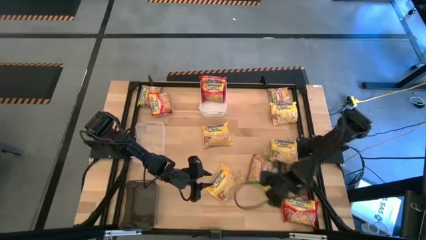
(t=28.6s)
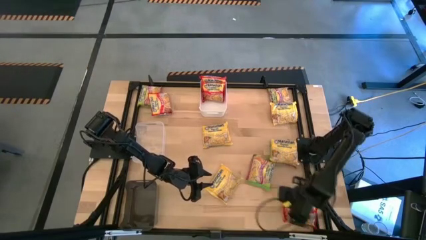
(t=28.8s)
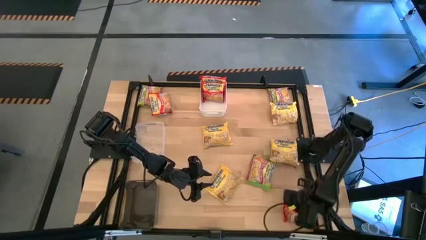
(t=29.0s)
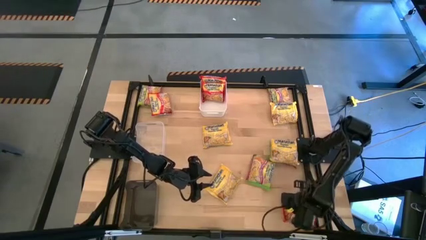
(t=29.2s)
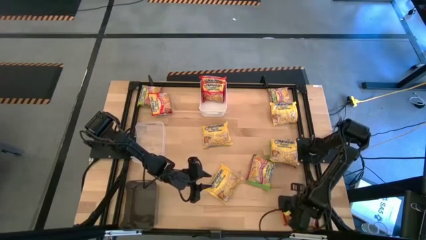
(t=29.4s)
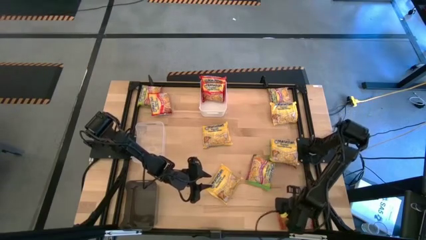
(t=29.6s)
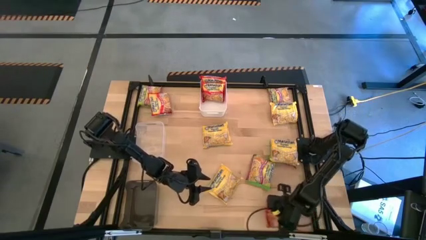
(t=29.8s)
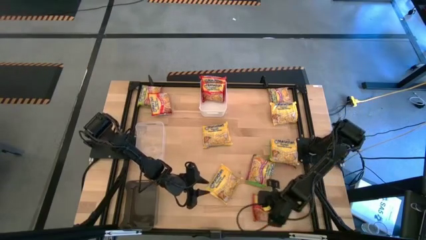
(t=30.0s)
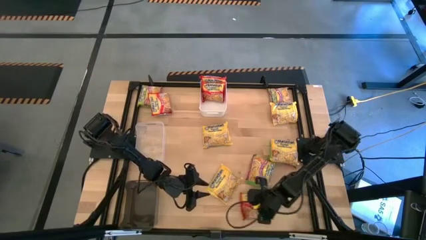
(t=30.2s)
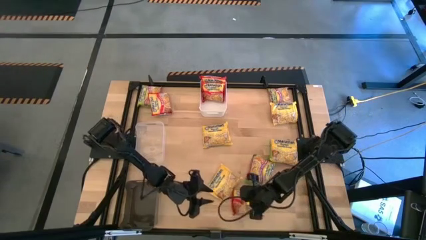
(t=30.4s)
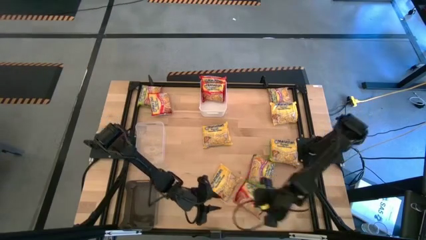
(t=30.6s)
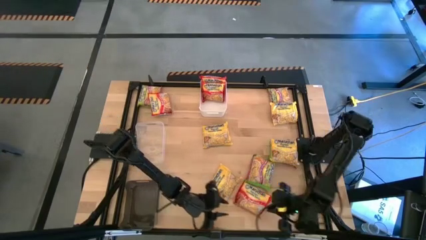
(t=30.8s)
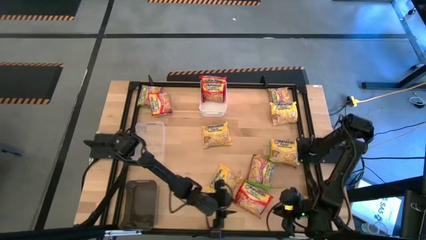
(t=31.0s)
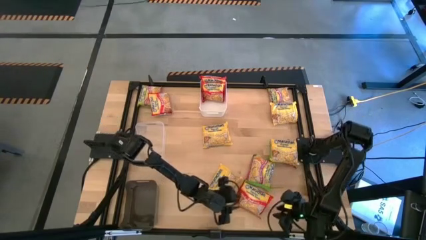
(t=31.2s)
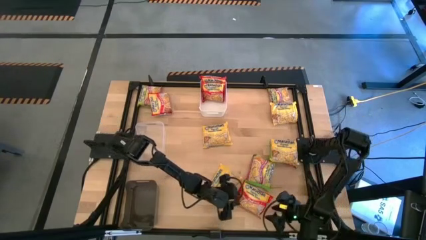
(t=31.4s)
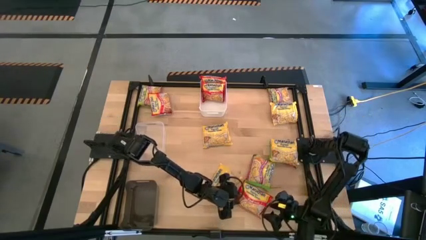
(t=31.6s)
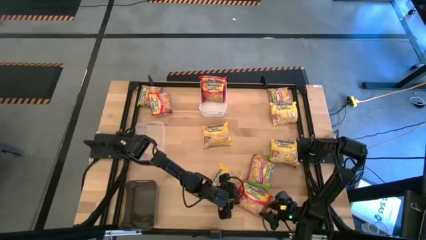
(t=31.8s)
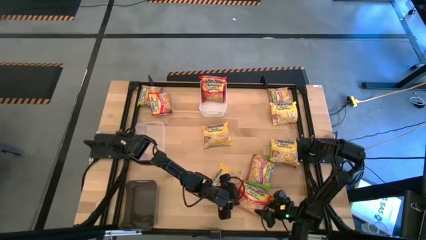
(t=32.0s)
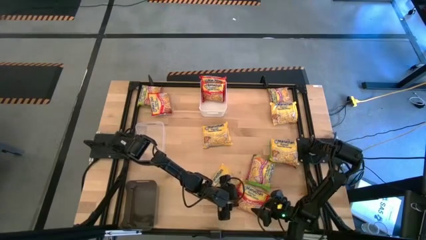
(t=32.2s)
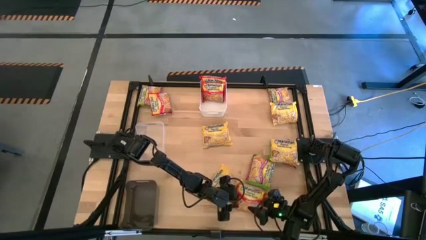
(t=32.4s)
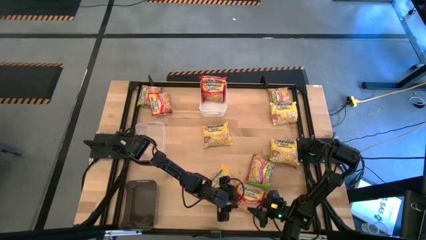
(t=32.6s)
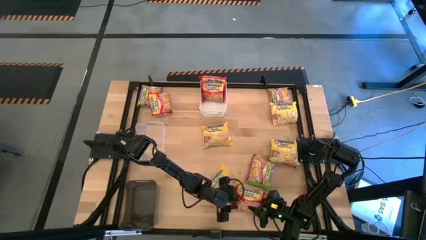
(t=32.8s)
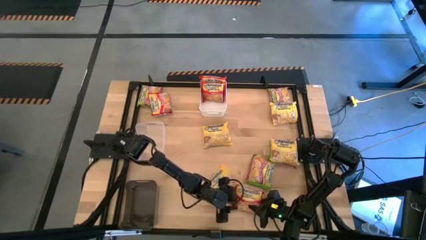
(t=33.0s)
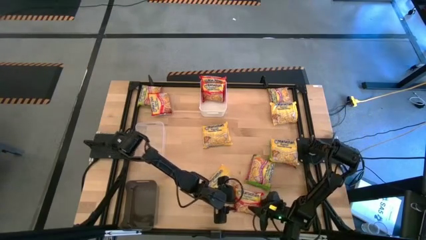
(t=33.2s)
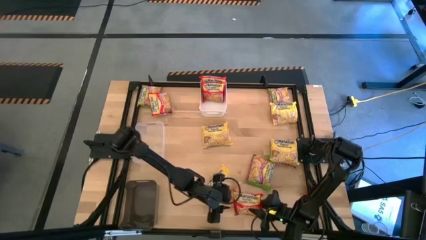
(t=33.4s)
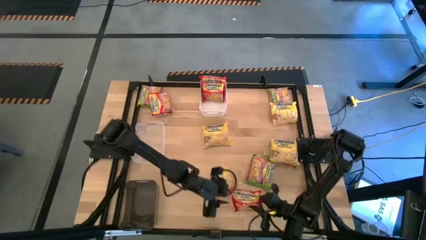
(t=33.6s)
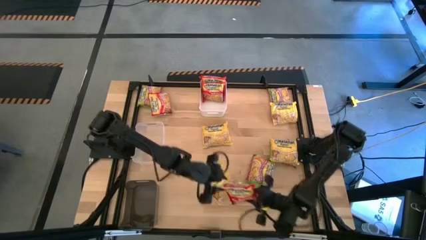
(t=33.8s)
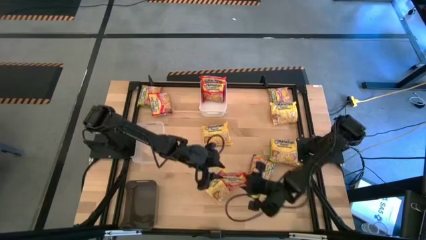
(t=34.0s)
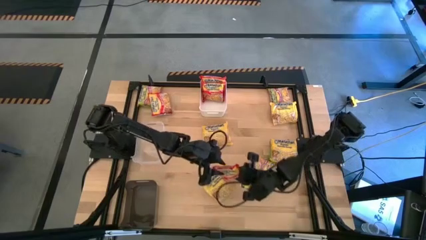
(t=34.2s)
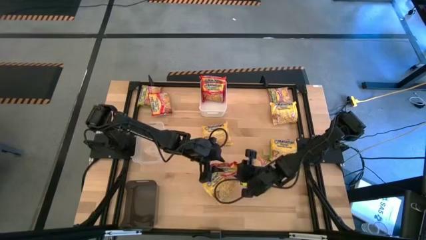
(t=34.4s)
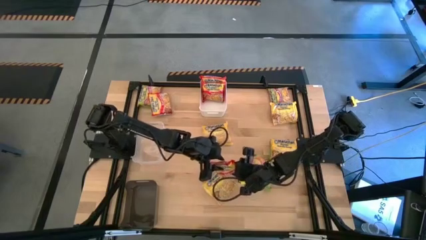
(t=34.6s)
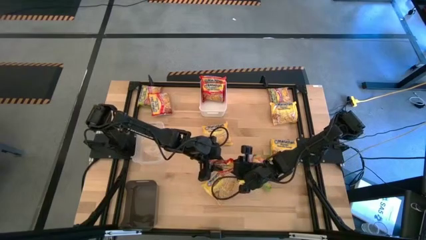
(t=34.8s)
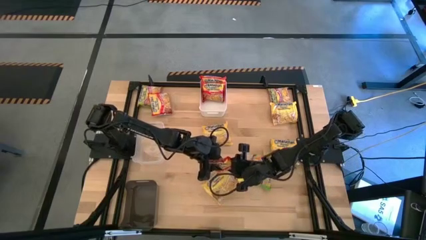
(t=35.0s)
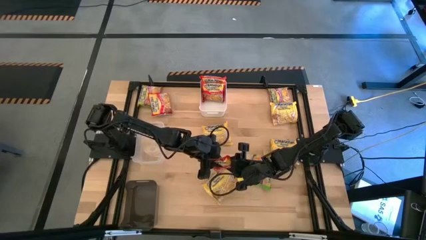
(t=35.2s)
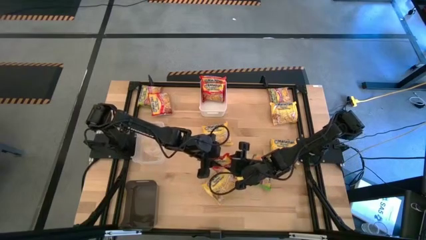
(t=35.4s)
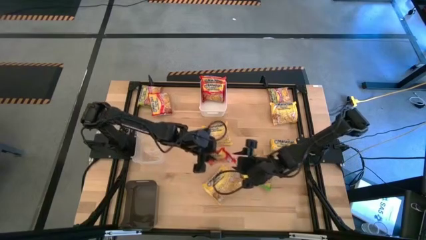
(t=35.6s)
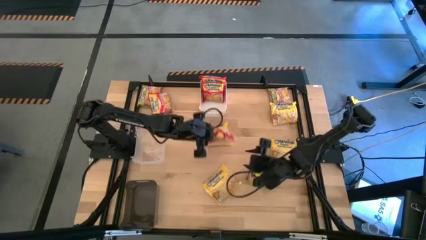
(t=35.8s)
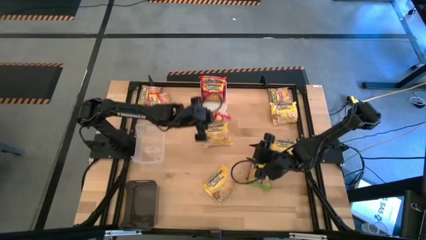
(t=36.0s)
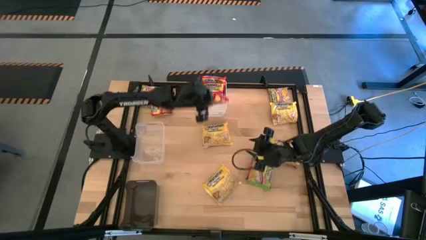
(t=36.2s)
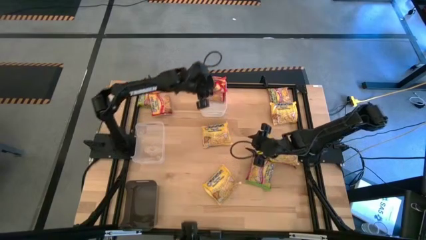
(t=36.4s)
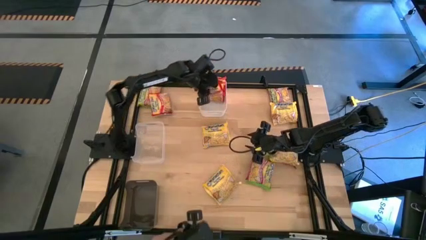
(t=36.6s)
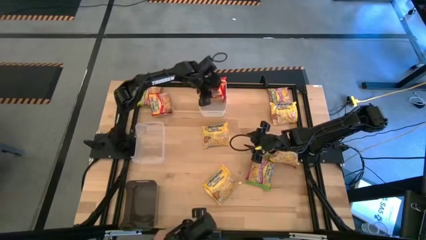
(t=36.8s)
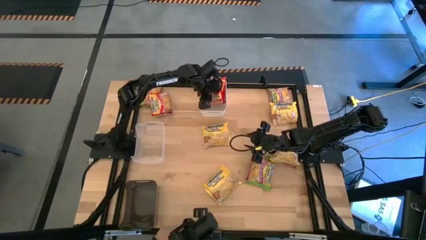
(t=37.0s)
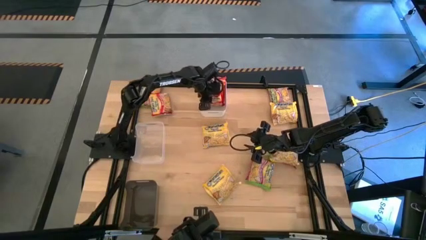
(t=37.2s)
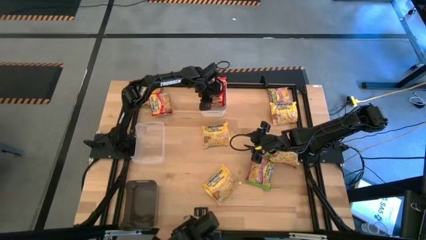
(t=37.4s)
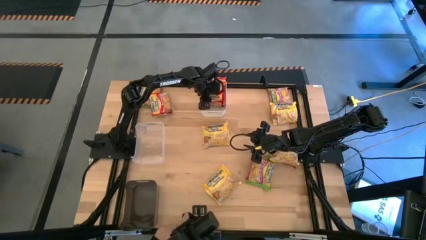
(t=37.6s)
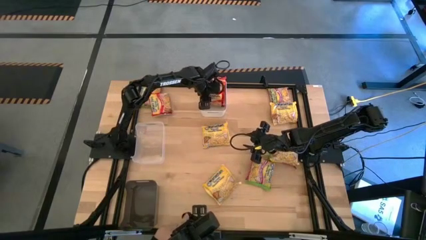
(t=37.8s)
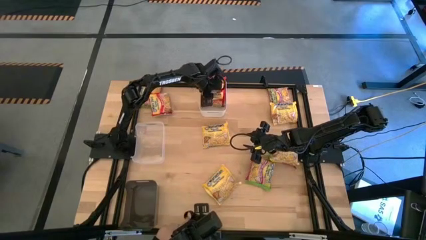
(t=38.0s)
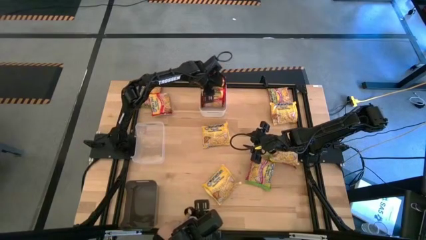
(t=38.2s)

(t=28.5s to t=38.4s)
Task: Sort Maruchan noodles
Put the red noodle pack into the white bin

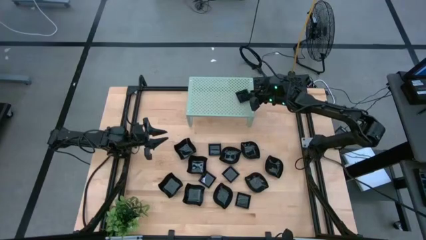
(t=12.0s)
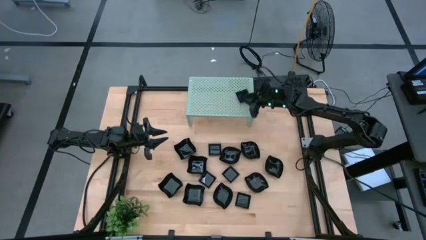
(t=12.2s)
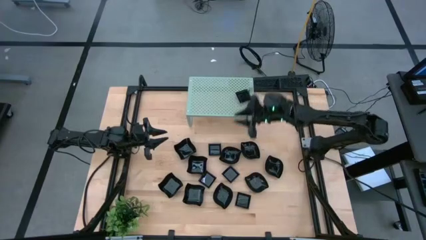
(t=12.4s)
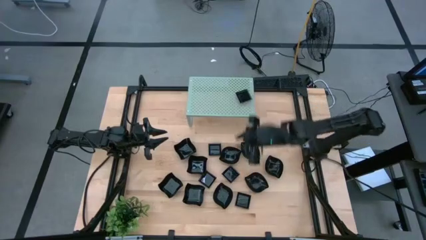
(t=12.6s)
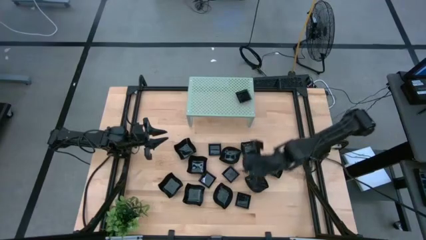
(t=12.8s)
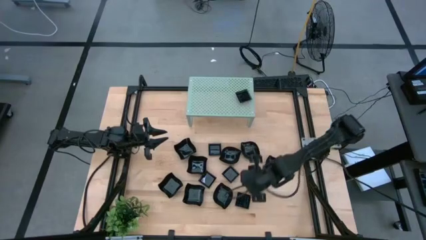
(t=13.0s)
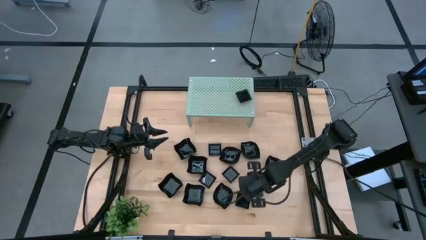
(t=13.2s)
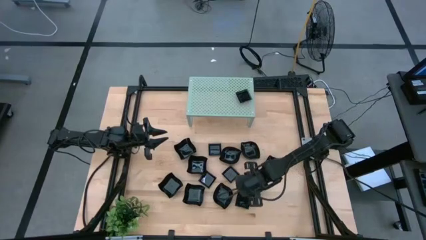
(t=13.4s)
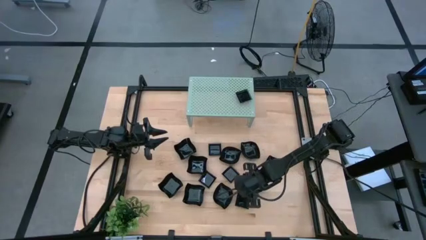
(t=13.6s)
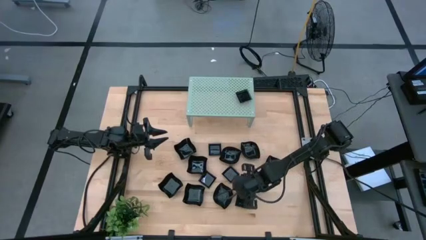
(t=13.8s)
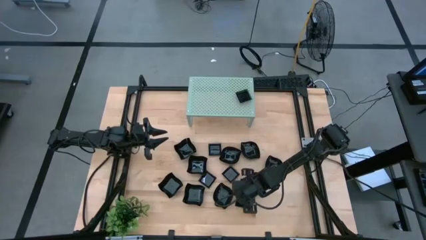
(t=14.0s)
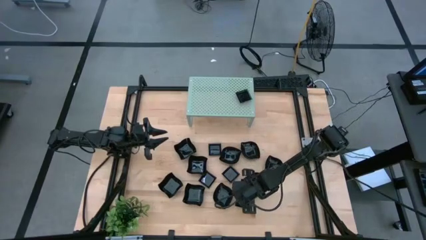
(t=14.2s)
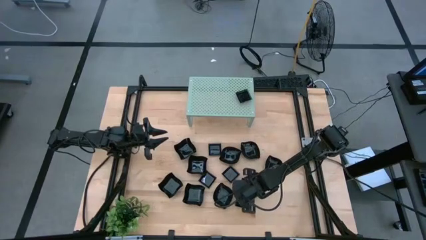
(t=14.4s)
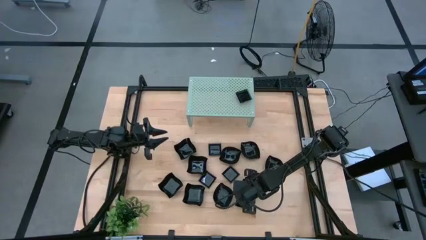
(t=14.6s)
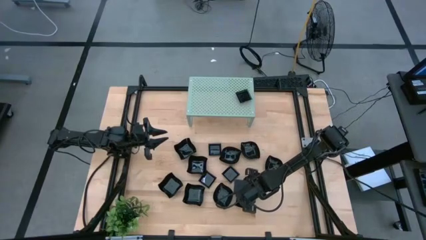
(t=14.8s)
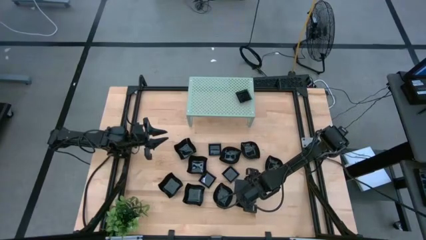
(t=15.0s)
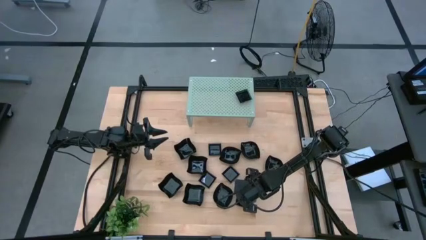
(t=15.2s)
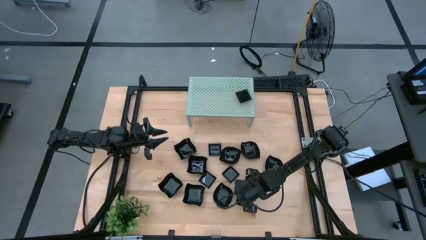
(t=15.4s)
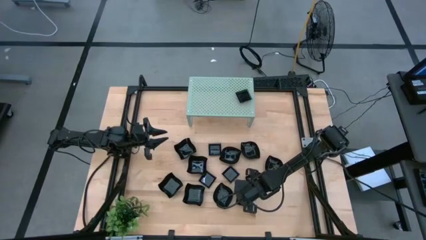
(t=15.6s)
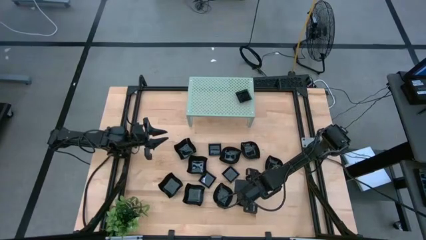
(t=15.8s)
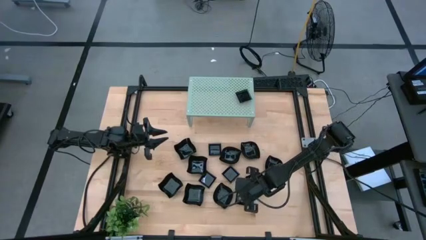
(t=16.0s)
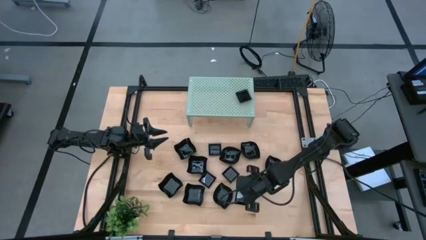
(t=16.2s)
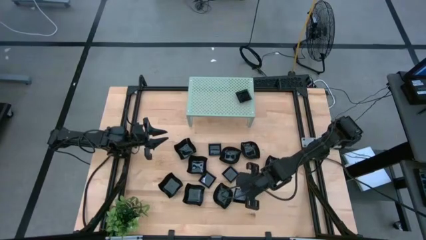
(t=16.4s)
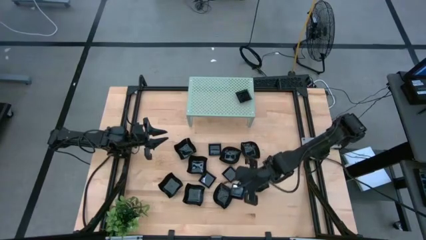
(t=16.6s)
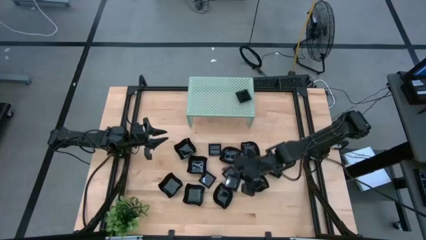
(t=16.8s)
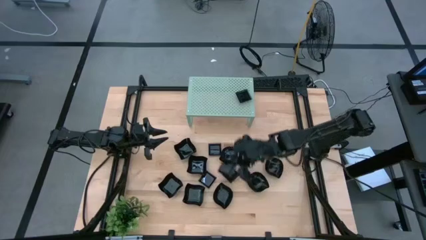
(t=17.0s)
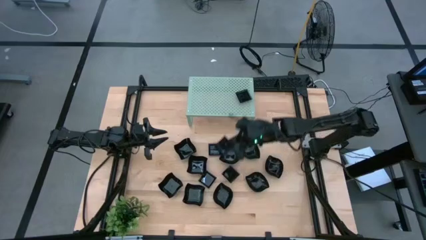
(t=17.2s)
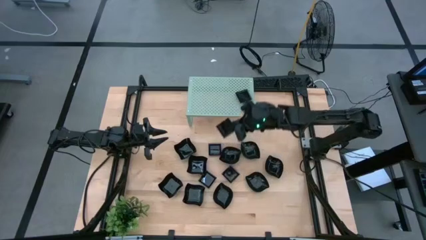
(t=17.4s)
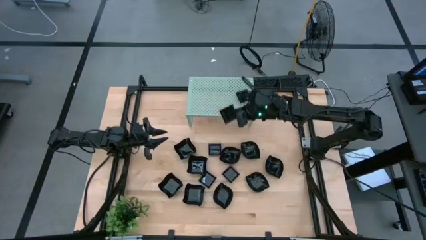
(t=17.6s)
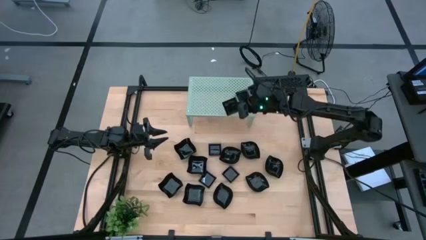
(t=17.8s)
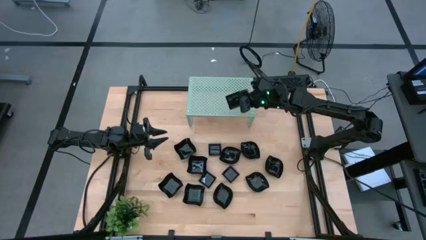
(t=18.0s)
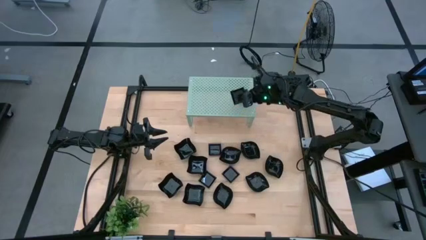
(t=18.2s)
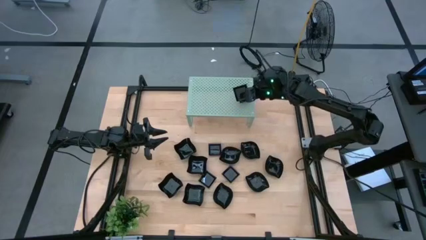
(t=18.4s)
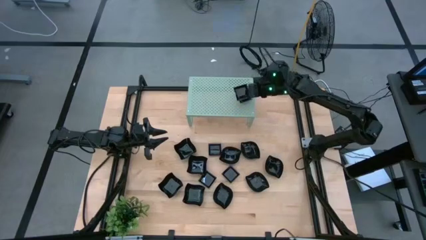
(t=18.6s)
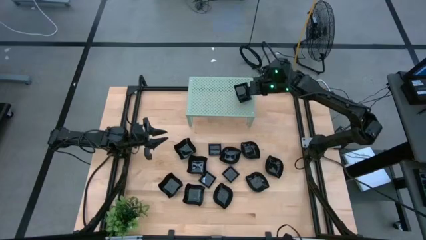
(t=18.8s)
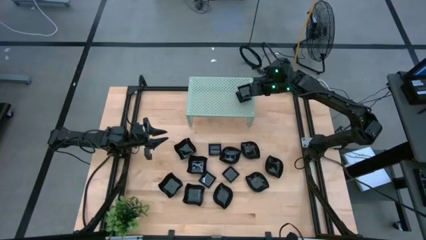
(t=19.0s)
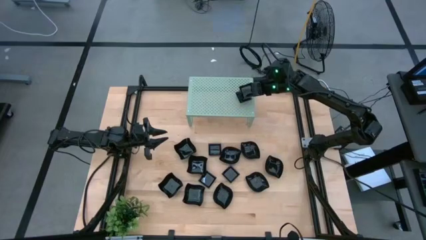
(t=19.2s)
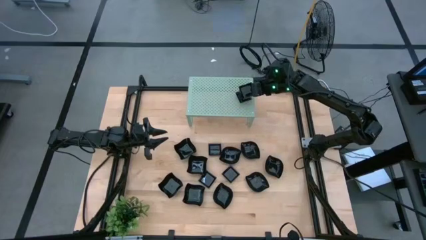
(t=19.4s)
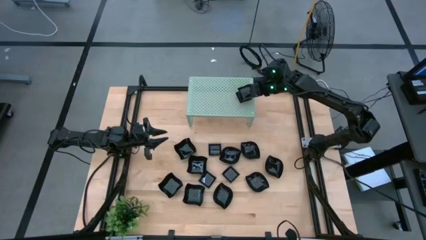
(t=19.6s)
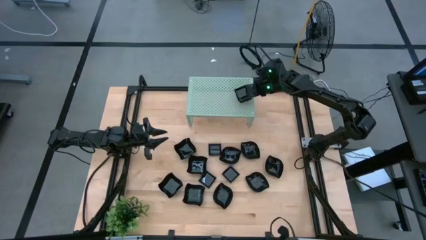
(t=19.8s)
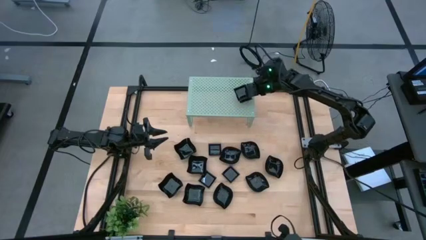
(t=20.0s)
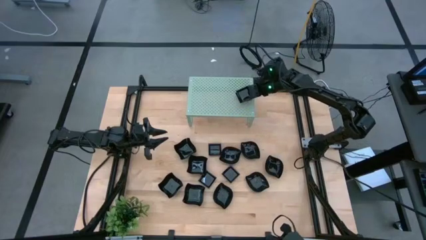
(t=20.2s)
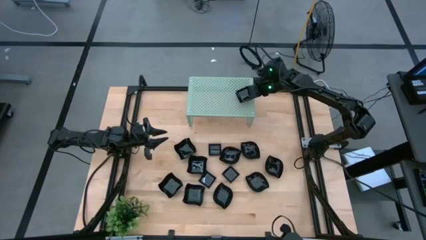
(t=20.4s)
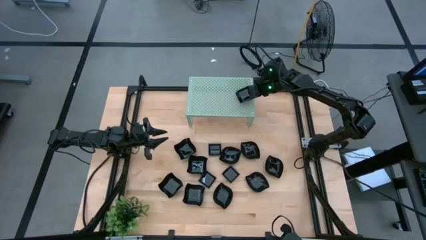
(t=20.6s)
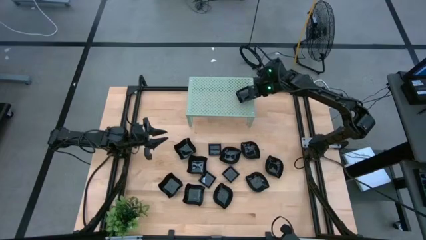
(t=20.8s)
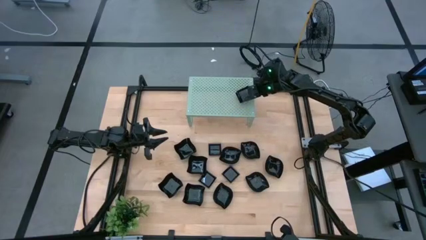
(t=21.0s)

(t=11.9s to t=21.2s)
Task: Pick & Place Mini shaped plates
Stack the black square plate on top of the other black square plate on the shelf
